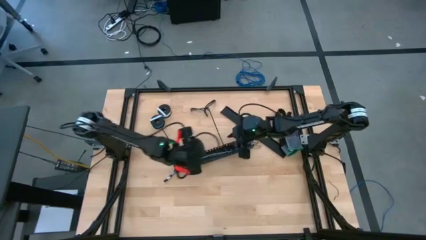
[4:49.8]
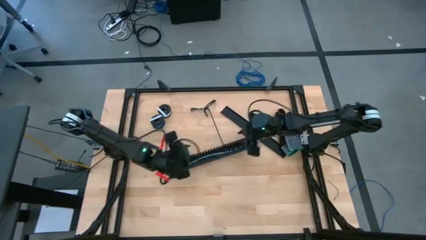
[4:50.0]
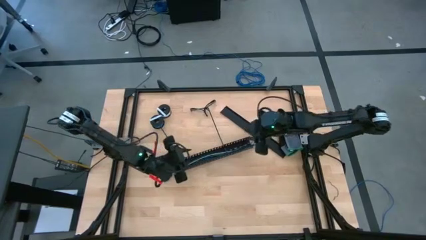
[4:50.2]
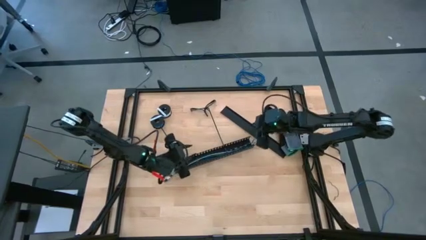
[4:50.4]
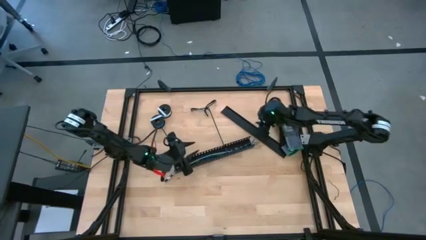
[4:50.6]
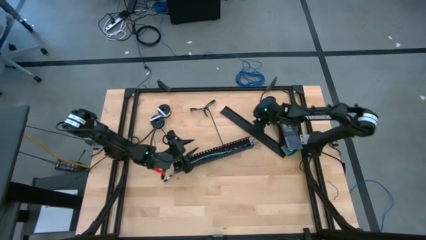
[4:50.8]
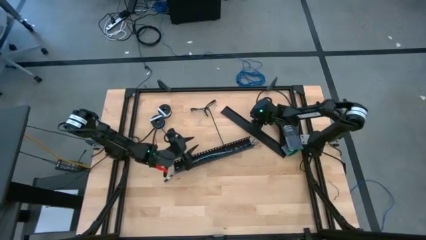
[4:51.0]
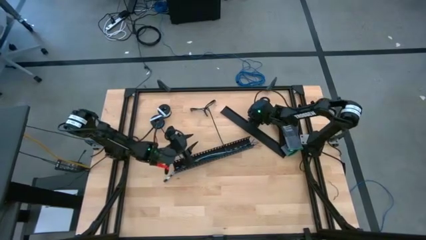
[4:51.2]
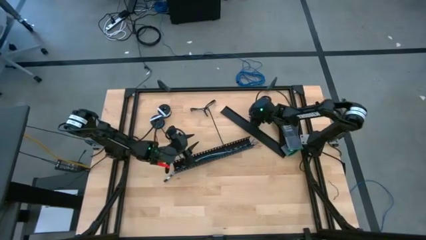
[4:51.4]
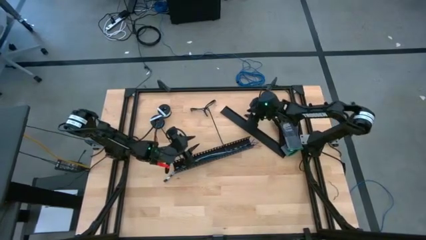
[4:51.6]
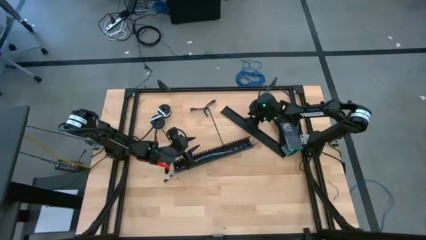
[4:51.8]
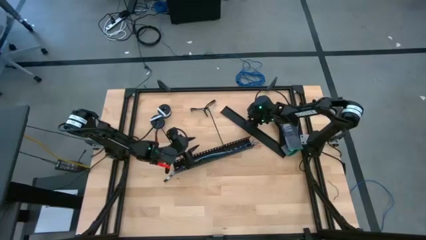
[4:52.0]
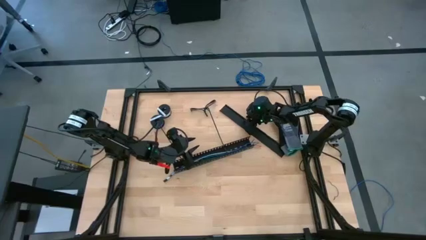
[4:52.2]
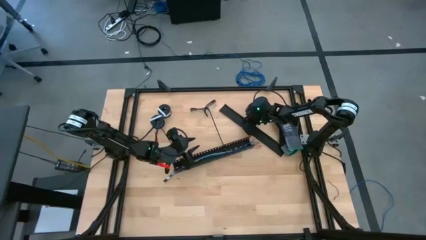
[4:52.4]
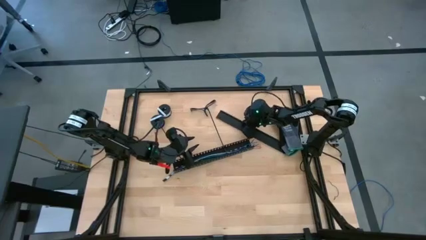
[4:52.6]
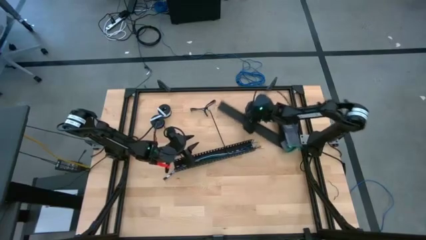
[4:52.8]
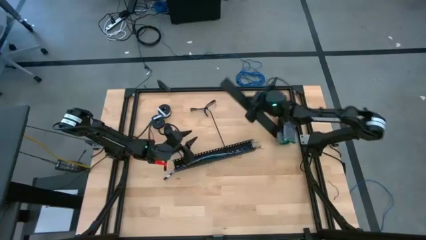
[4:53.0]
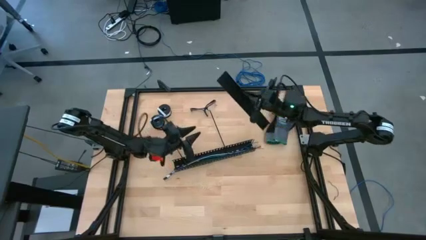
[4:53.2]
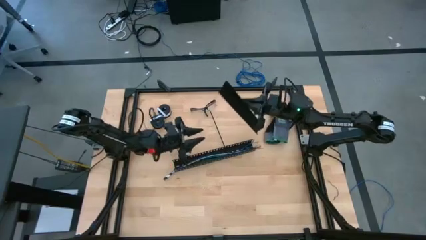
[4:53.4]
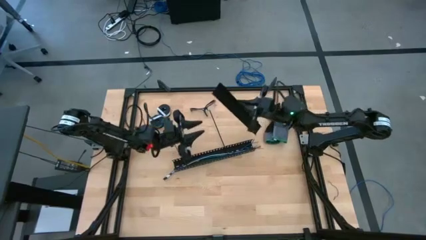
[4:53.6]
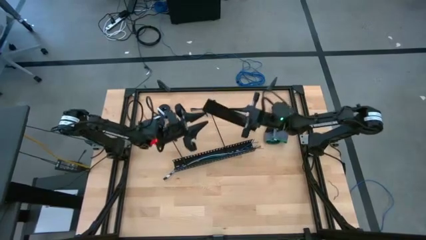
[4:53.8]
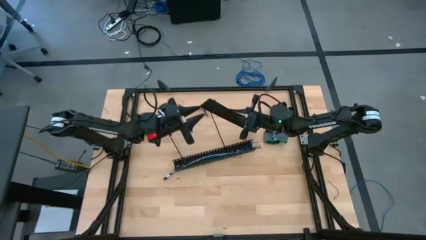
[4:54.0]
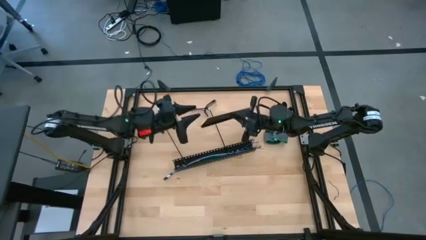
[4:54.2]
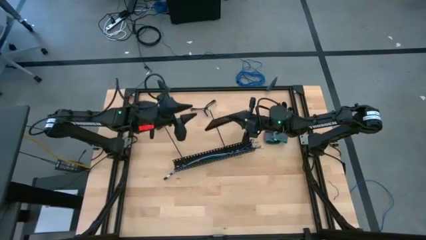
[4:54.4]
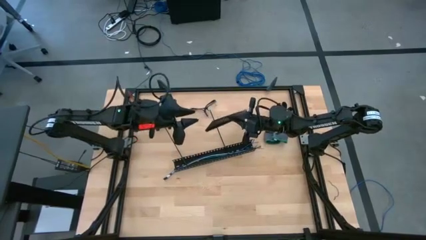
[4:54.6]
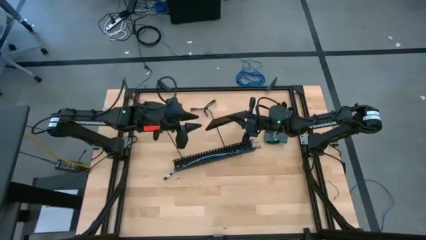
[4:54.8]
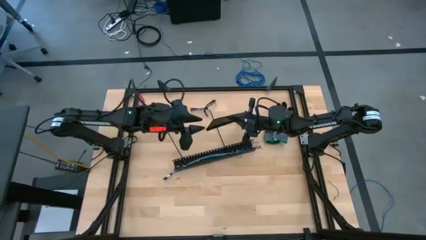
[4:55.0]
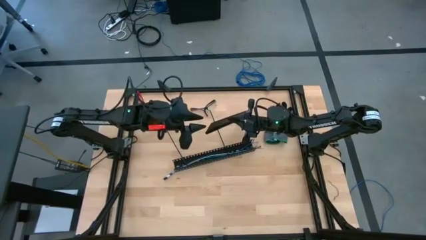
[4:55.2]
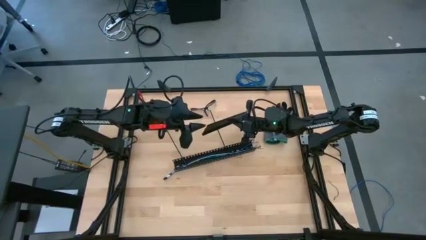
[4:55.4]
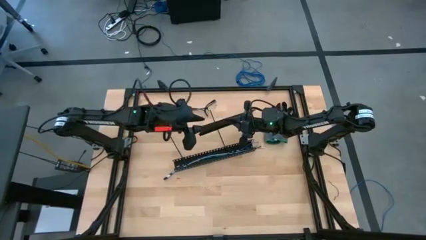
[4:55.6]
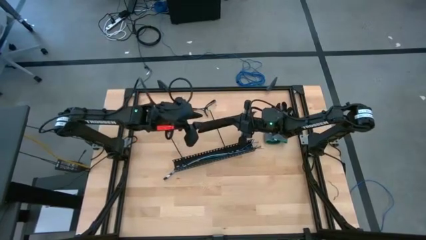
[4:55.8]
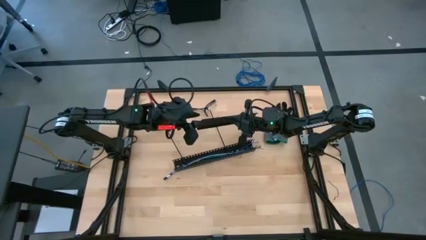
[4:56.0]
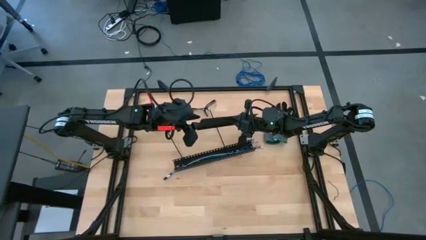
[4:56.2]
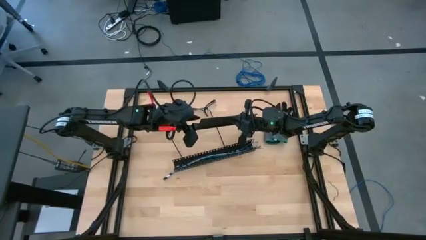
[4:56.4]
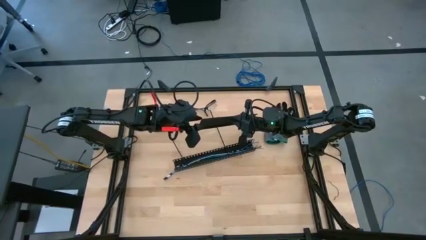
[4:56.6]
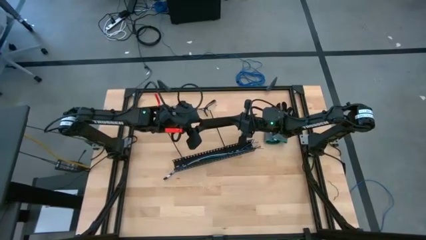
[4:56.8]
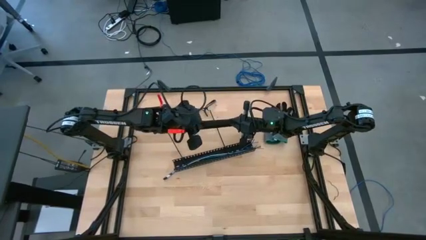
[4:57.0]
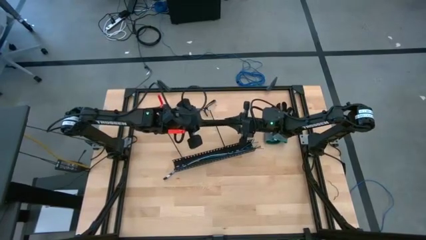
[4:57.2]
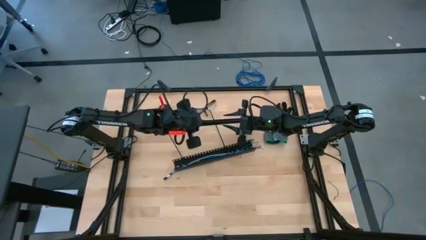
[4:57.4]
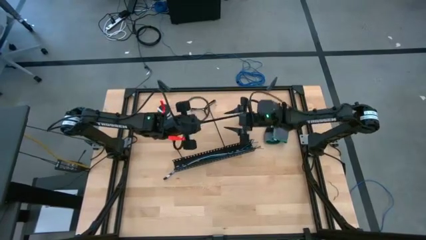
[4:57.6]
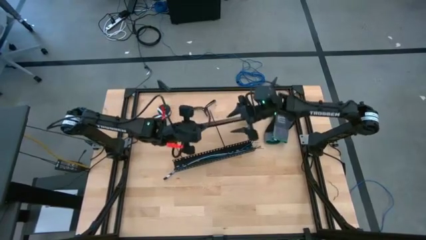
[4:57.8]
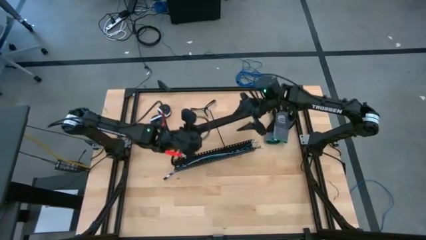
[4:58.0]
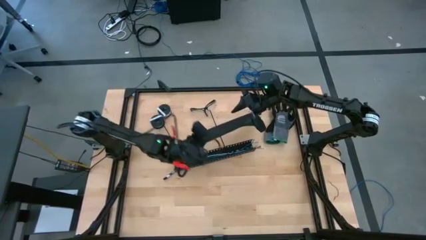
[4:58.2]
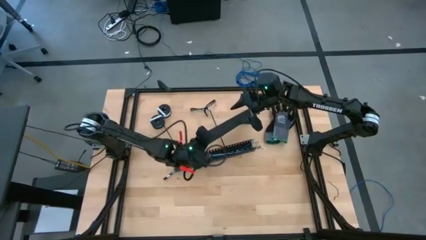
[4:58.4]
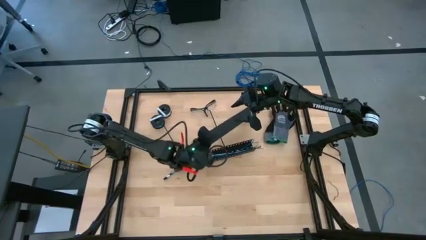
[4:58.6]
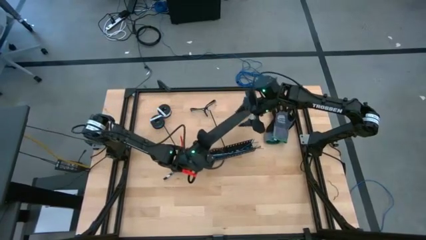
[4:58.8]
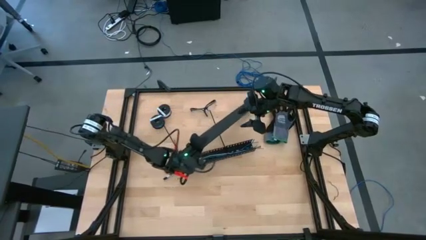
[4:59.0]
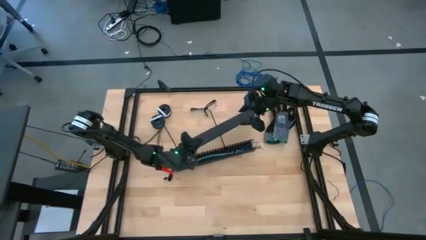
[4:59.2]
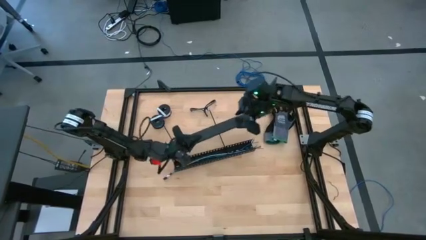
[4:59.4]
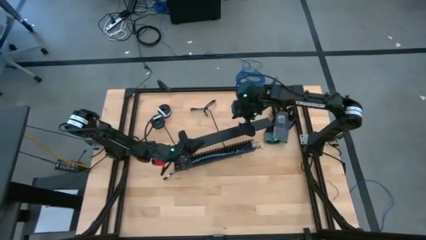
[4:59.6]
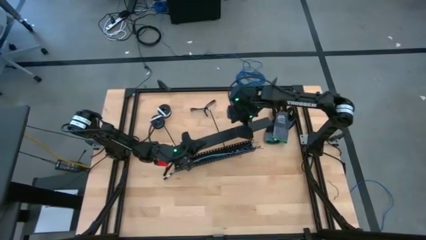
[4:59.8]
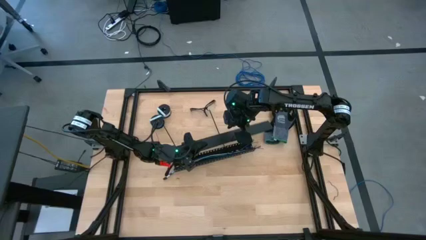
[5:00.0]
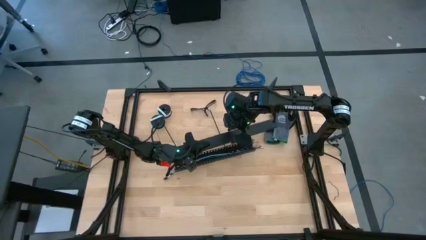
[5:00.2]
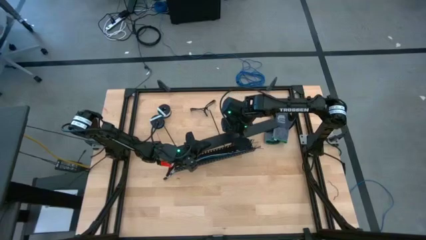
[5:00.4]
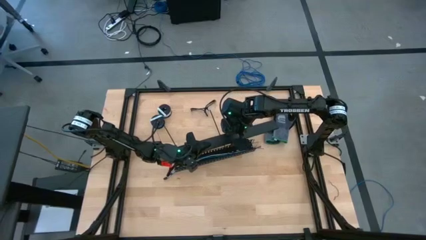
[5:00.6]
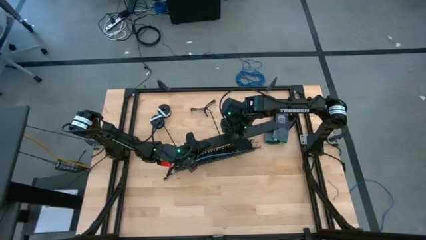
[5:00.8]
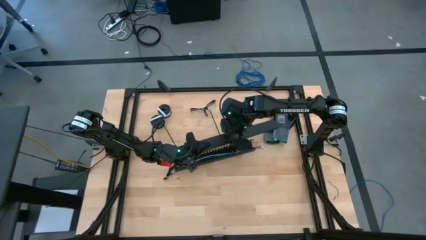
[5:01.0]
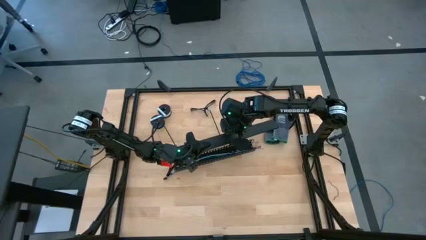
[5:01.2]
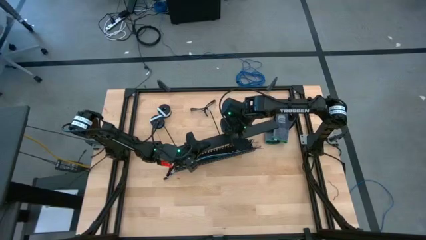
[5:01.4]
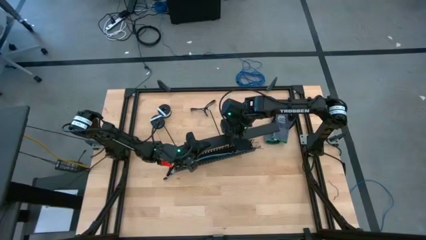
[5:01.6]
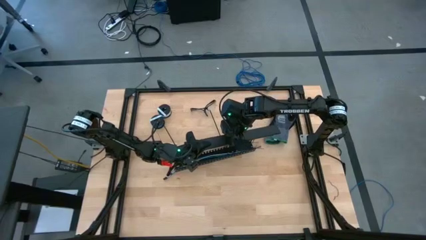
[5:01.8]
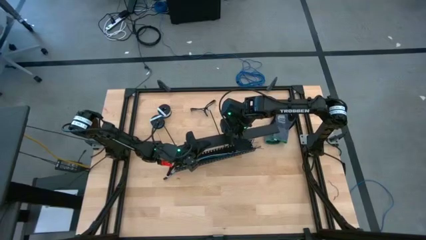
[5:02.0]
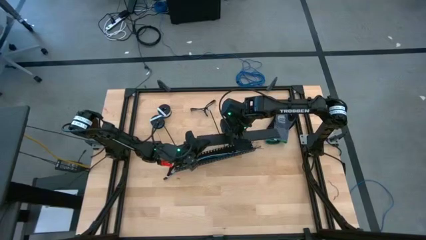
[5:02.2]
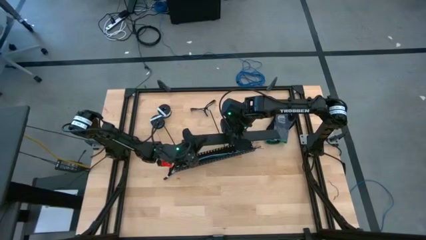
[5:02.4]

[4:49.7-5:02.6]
Task: Ziptie cables
Insert the black cover of the black cable duct

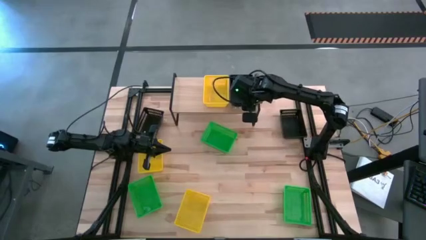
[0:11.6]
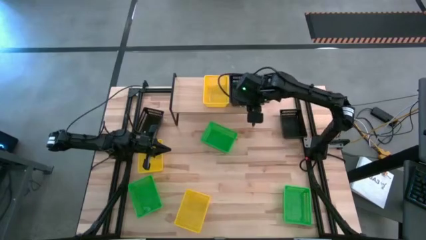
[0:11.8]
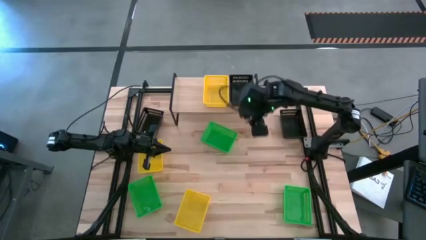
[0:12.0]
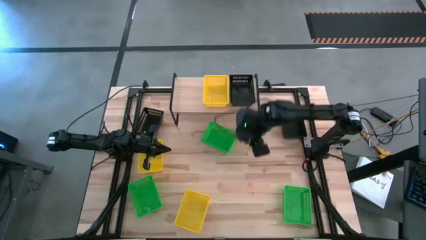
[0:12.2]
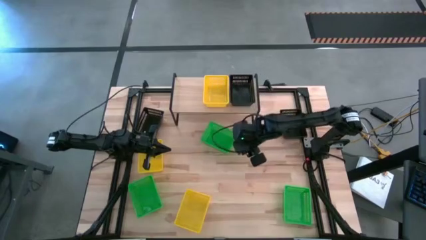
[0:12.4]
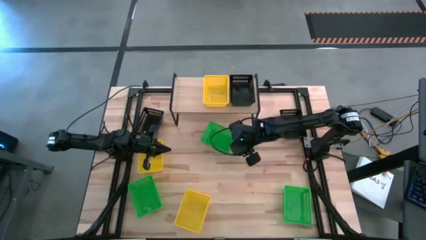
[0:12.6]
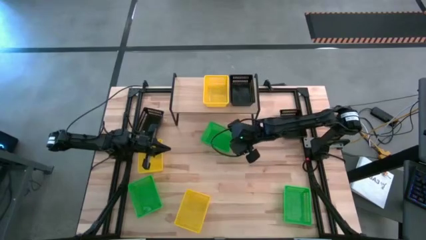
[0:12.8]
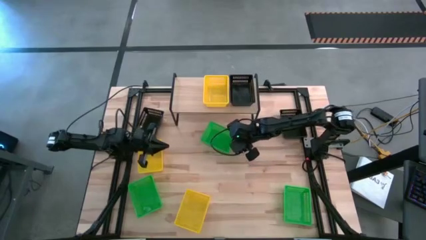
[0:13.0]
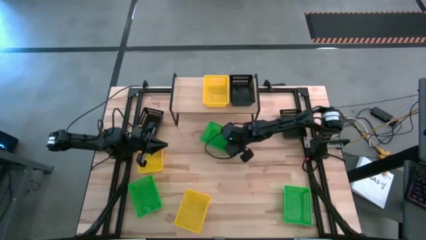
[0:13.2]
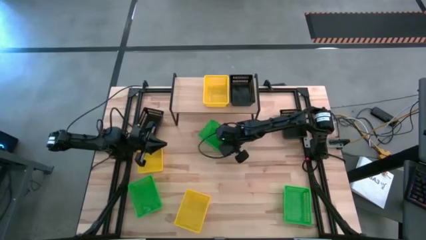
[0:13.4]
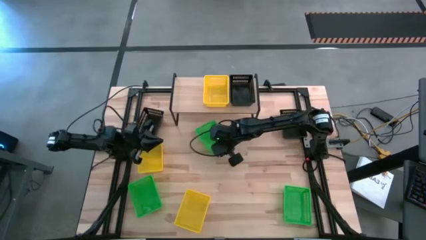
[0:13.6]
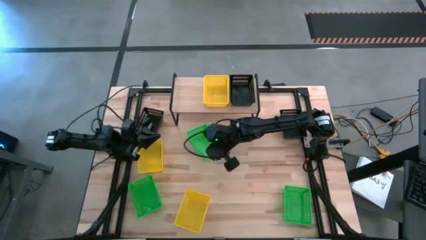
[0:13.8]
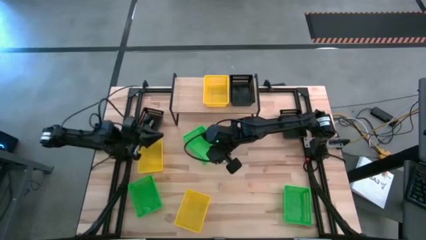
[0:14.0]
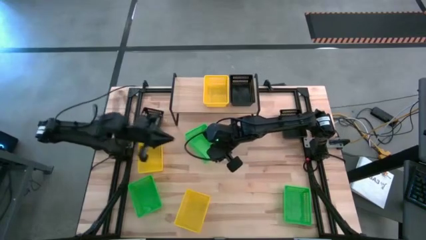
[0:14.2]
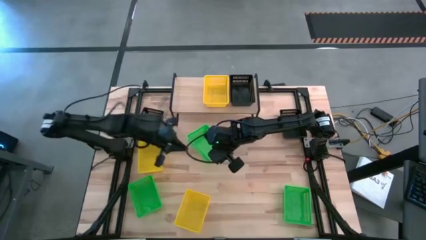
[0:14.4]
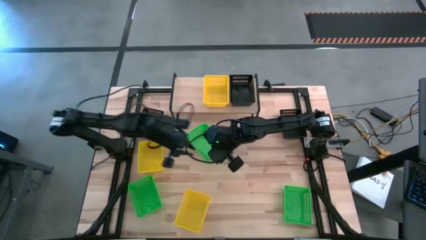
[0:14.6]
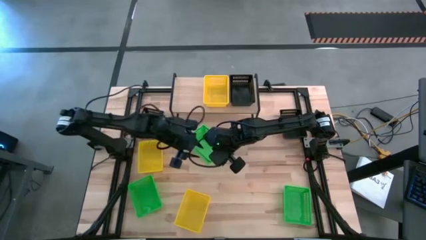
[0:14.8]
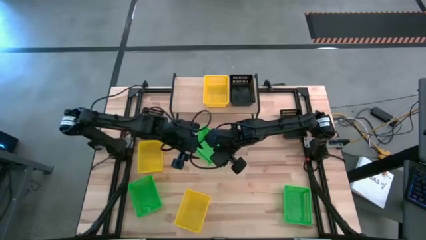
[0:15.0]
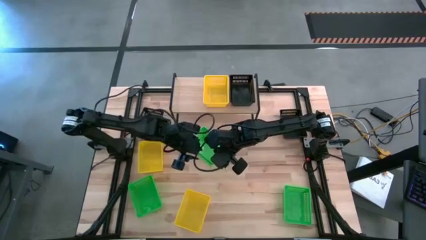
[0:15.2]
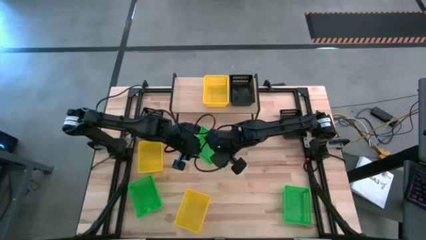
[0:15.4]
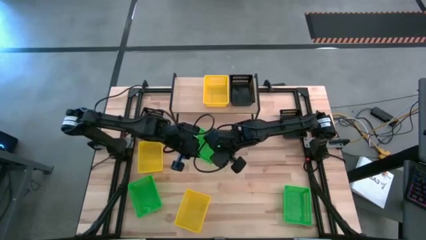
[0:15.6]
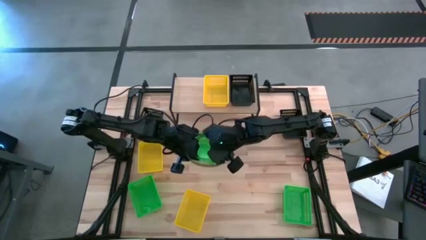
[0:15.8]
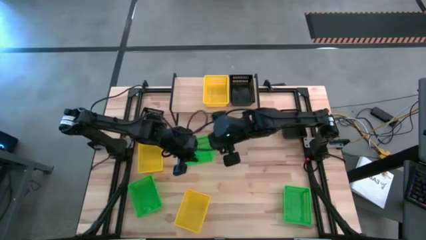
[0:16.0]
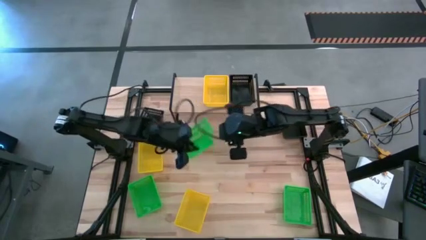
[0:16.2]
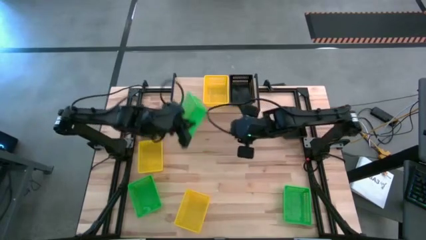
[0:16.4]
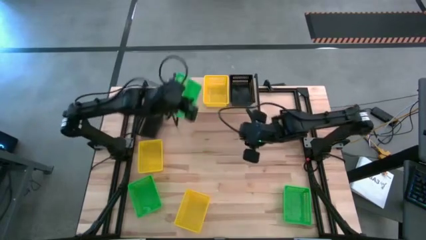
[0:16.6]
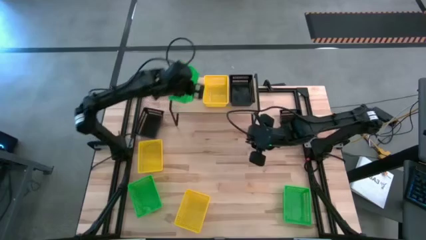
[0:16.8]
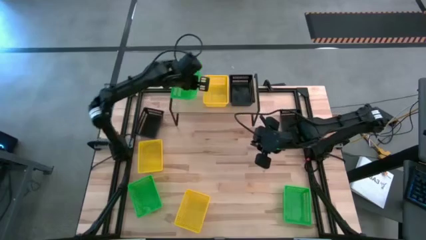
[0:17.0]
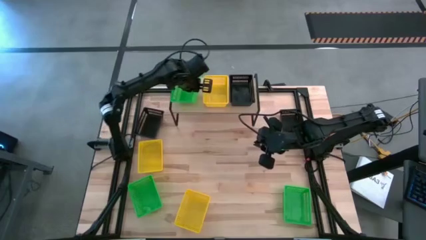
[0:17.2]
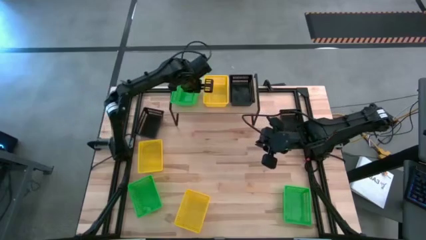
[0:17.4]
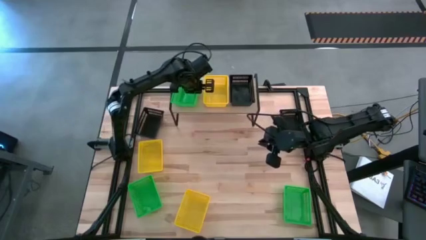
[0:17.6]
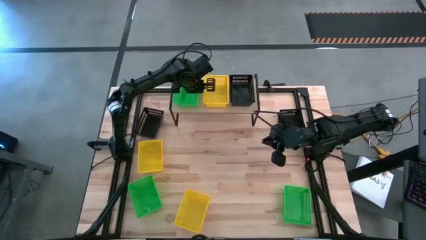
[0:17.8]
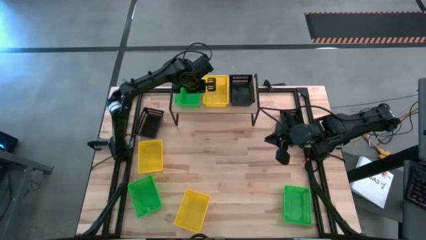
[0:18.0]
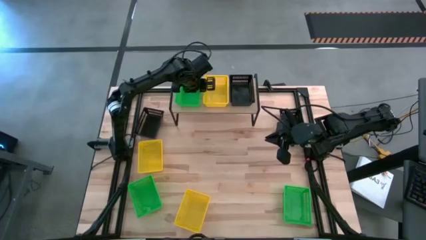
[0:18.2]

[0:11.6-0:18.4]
Task: Stack baskets on shelf by color
Put the top green bin on the shelf
